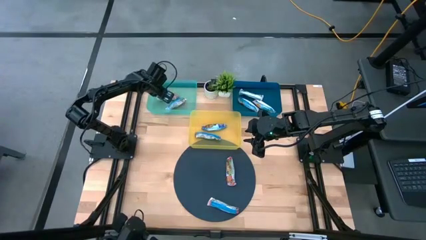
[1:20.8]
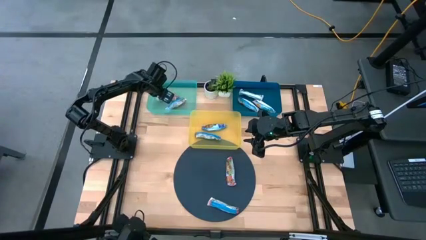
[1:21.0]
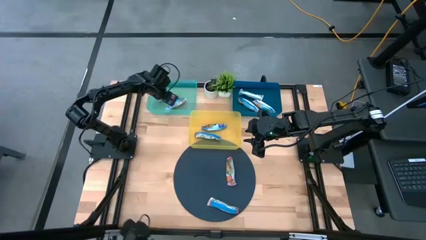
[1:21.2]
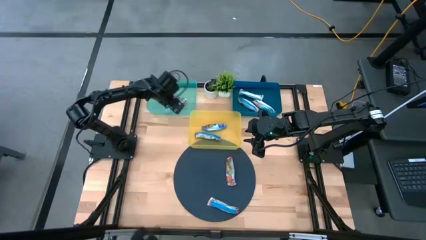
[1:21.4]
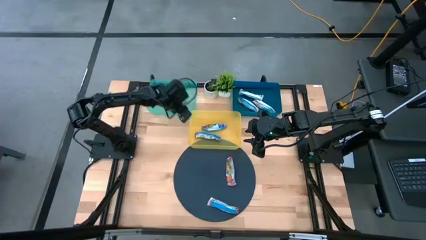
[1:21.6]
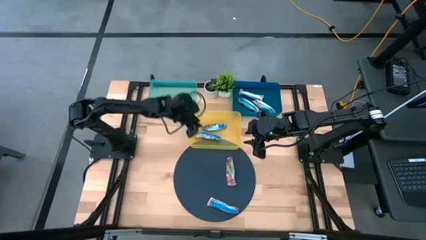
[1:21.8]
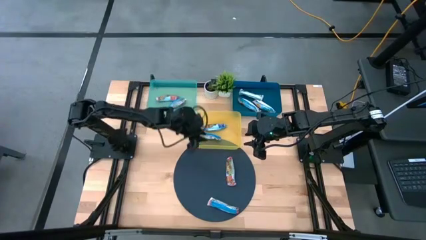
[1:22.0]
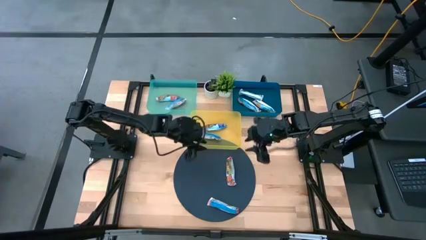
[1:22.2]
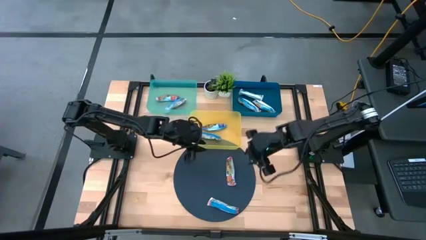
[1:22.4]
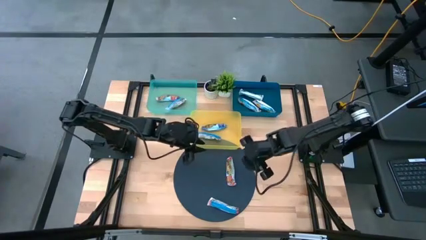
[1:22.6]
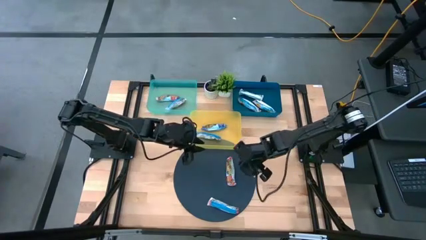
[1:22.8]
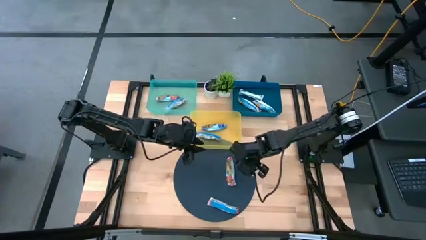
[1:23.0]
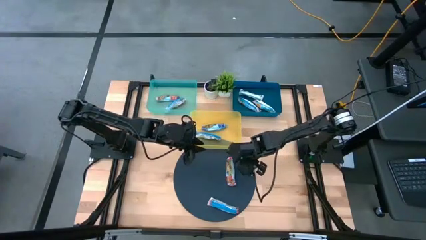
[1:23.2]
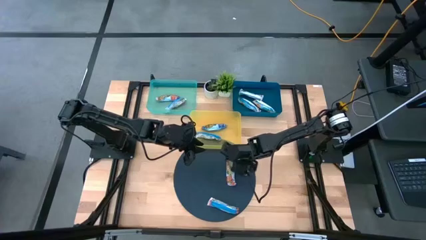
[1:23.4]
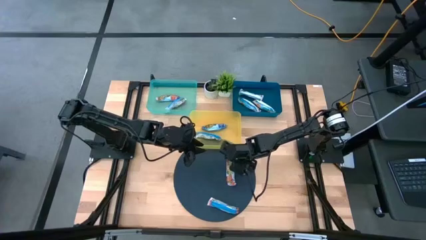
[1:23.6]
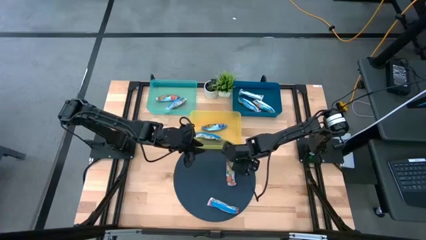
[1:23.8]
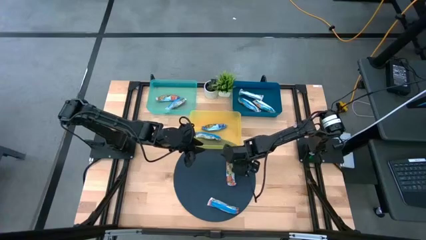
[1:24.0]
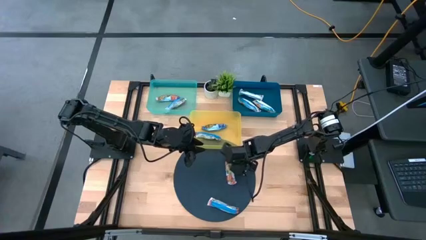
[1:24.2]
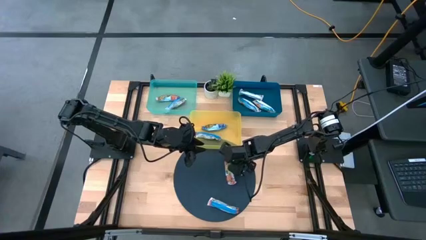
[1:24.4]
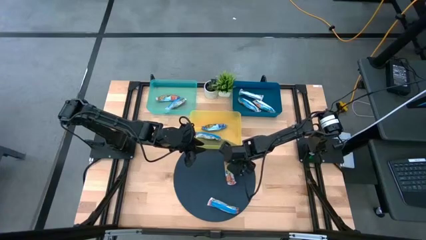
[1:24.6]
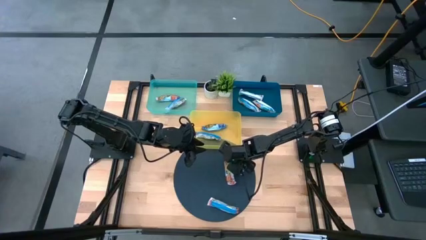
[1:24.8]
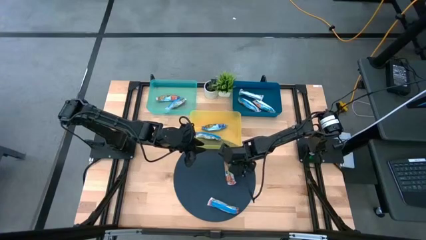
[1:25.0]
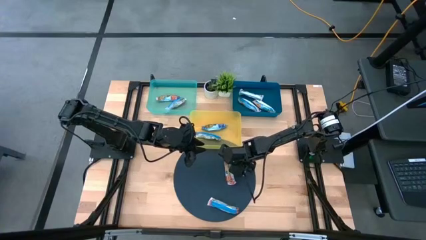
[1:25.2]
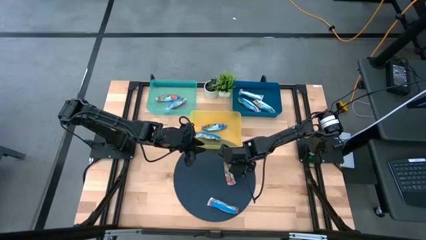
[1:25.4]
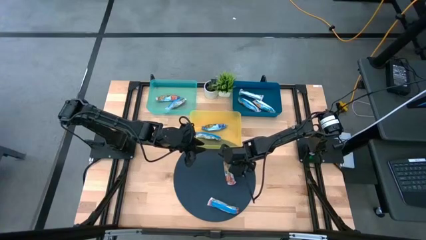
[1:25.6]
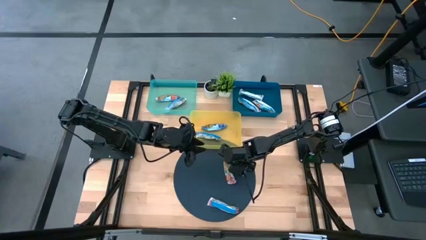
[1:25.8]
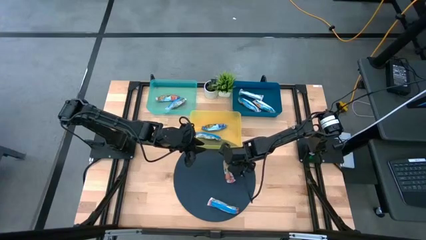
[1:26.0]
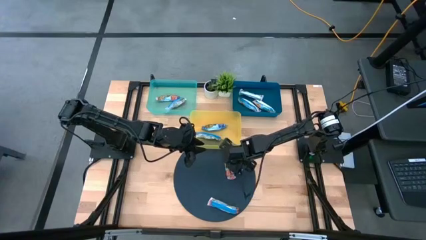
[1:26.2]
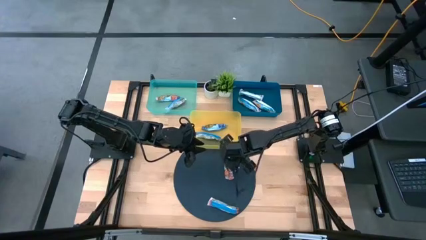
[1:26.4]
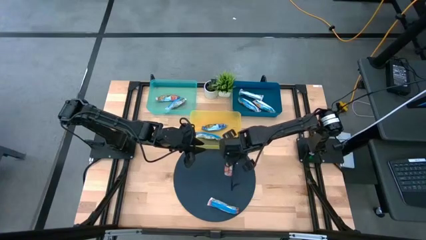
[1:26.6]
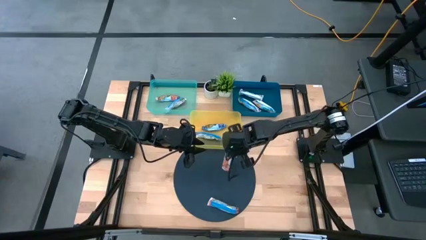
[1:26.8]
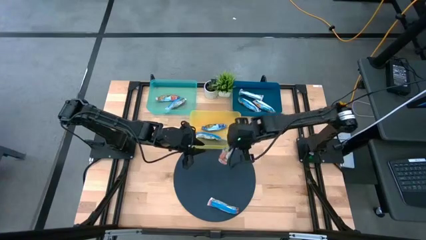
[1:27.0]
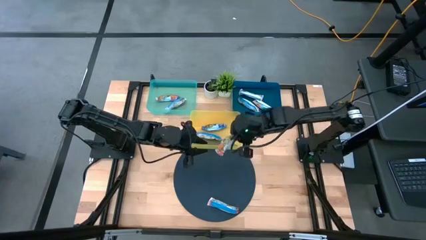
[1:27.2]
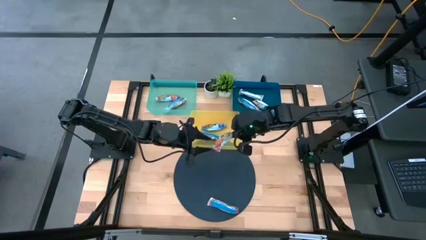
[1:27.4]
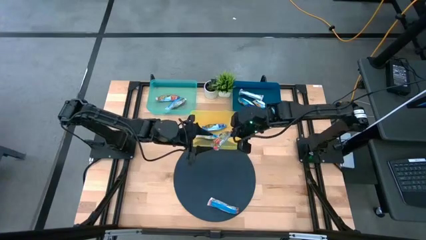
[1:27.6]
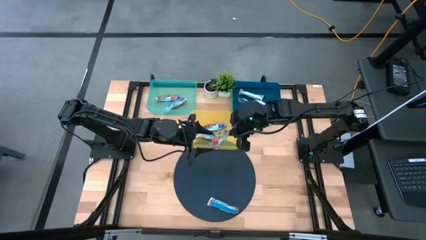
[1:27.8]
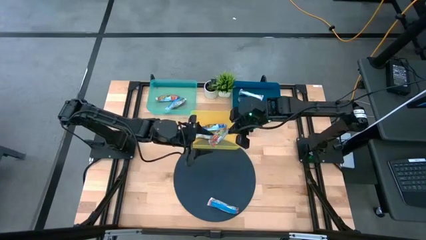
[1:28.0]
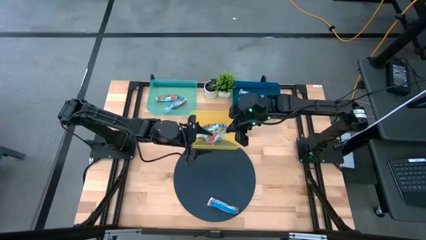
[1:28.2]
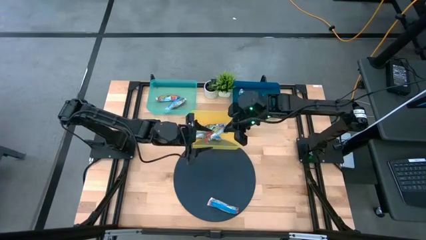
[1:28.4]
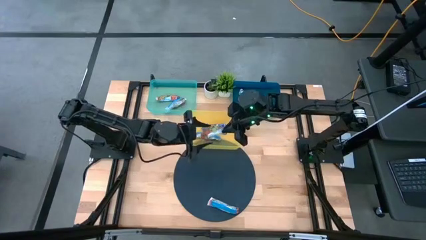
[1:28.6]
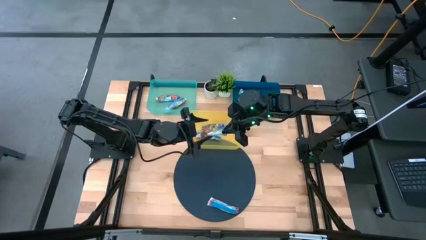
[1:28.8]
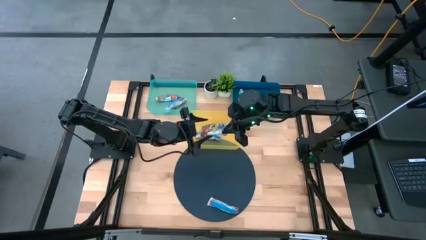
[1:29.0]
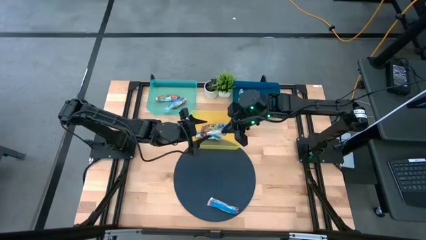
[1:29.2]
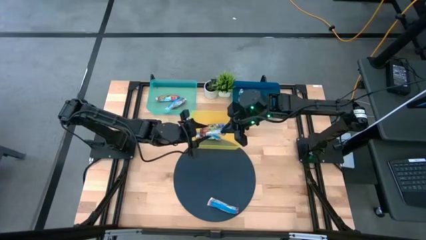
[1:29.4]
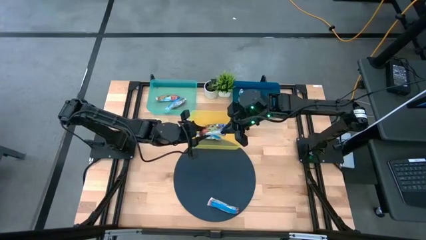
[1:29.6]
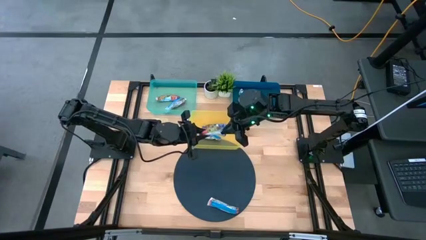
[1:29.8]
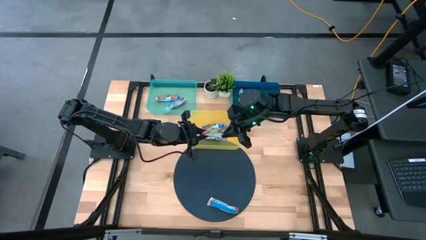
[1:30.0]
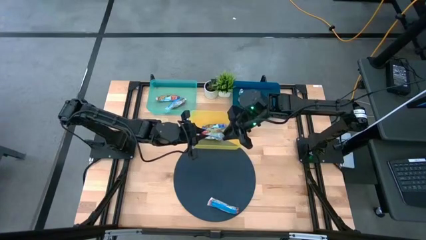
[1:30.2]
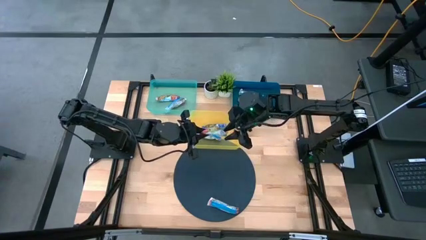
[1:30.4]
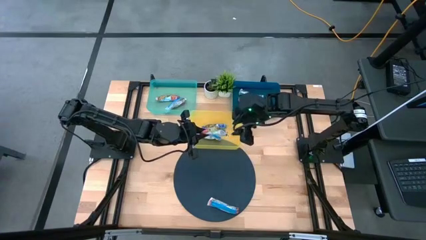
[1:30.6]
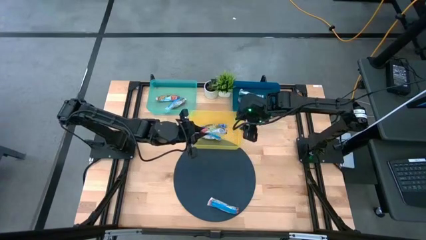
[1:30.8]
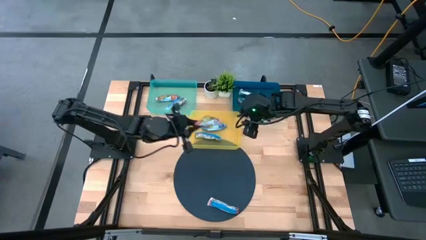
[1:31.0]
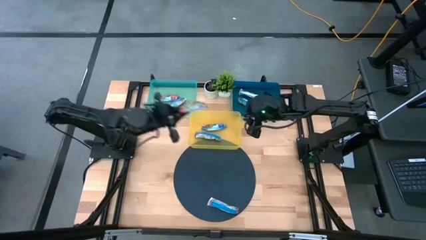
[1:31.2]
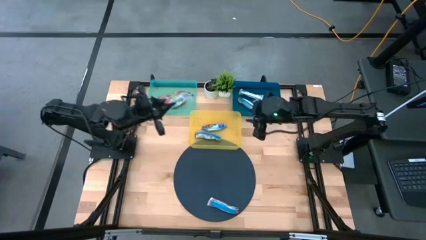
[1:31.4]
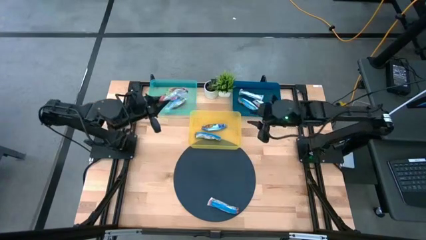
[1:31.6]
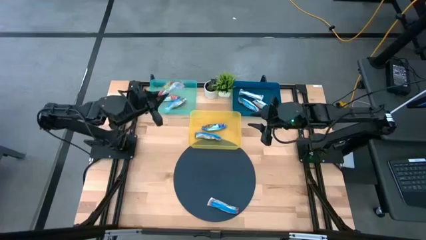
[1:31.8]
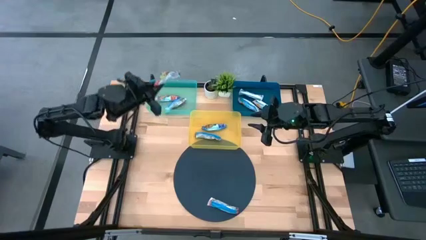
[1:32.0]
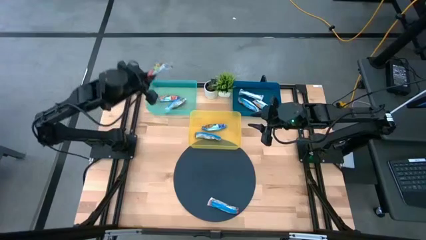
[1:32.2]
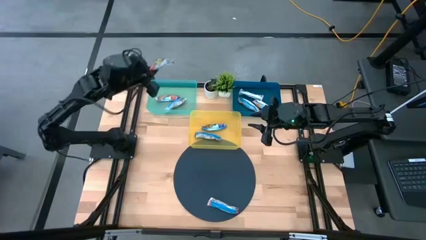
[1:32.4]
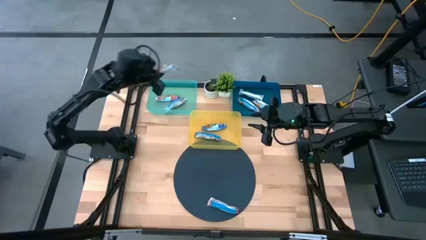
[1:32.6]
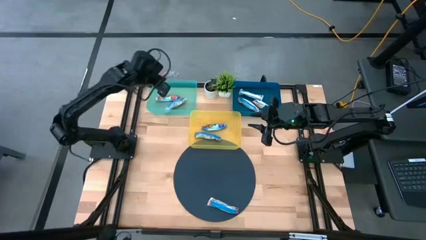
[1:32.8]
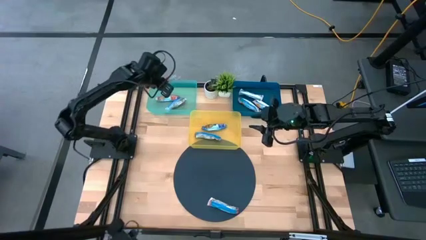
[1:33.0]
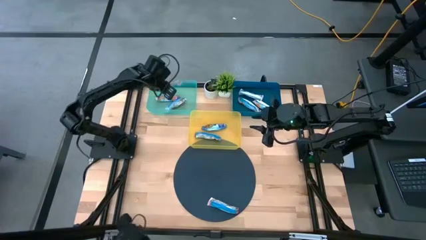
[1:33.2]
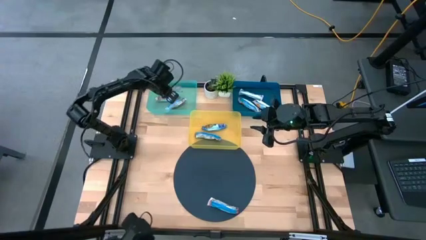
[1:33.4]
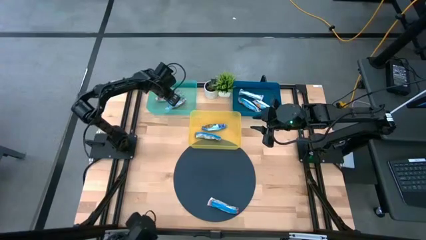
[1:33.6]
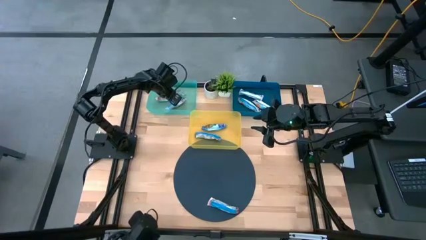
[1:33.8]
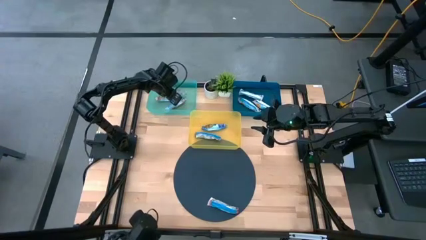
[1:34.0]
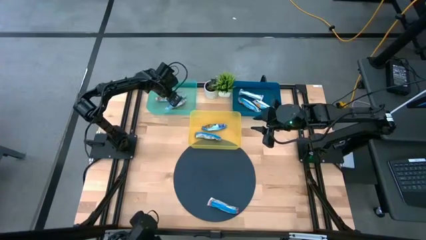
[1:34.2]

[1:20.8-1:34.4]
Task: Pick and place Granola Bars by type
Put the red granola bar into the green bin
